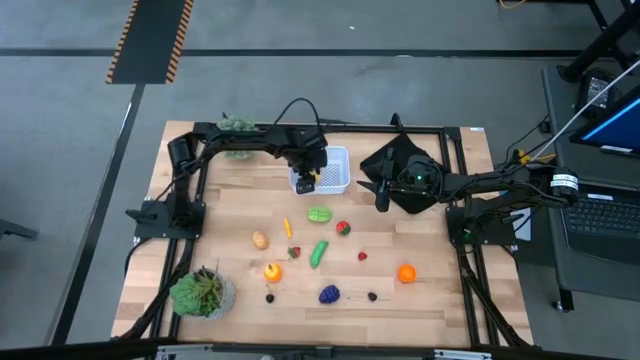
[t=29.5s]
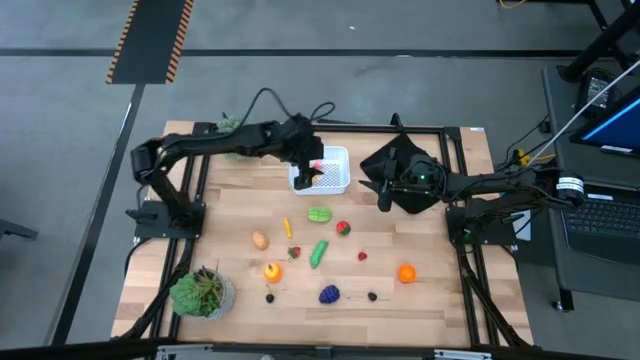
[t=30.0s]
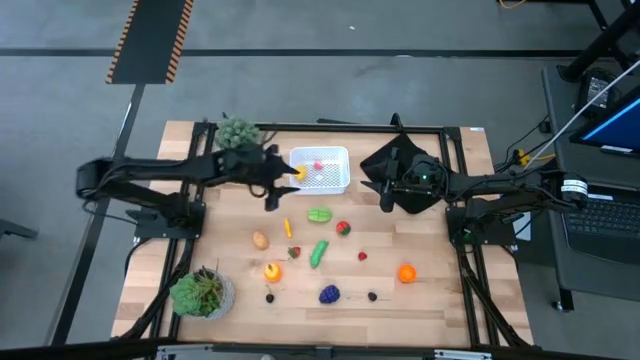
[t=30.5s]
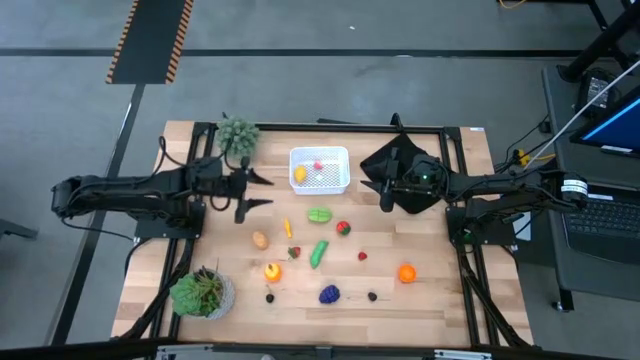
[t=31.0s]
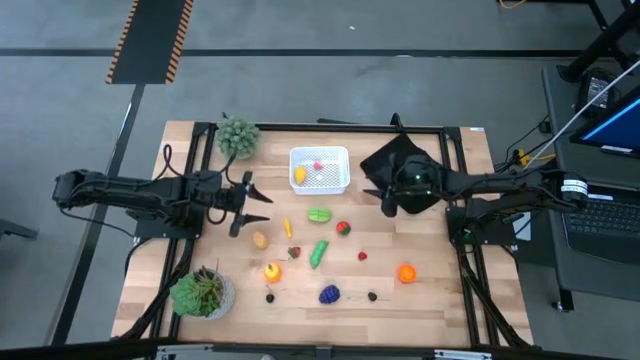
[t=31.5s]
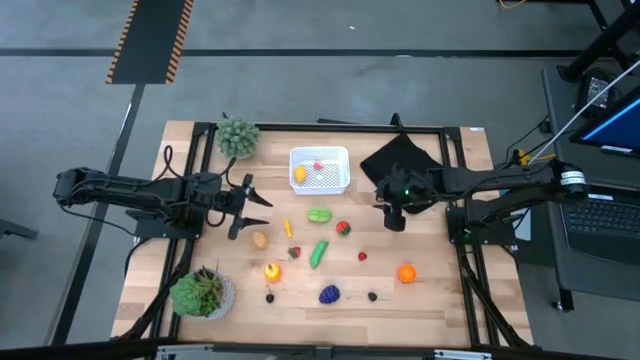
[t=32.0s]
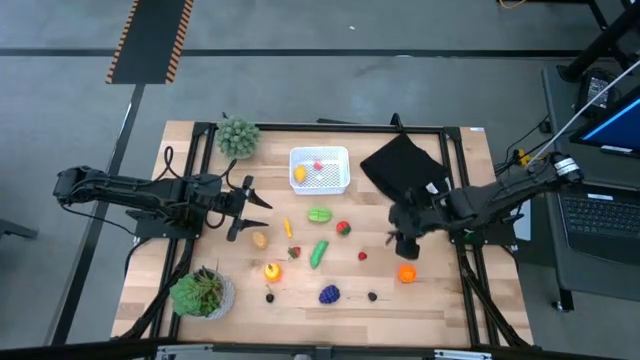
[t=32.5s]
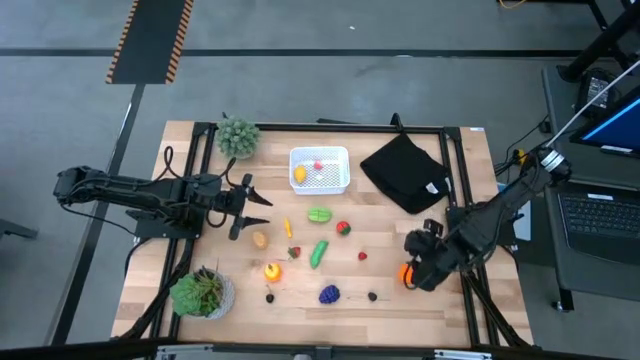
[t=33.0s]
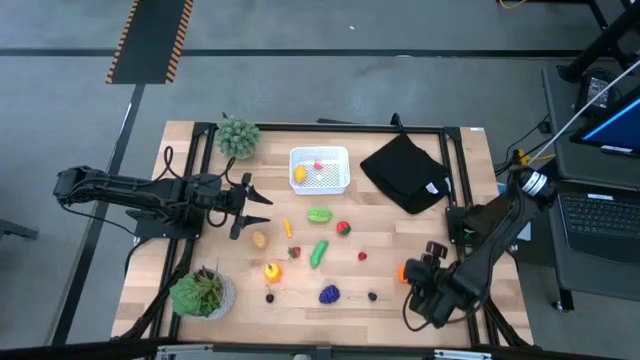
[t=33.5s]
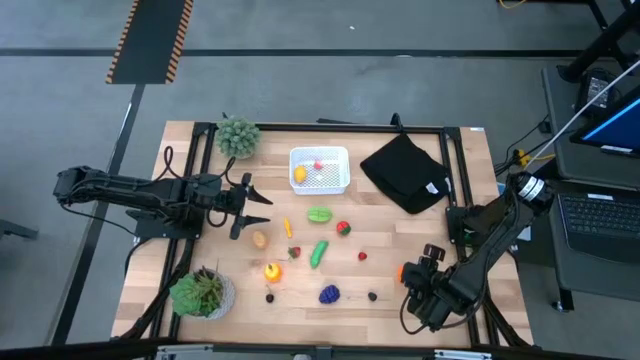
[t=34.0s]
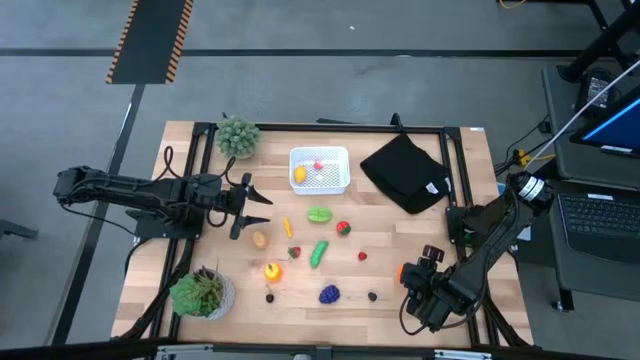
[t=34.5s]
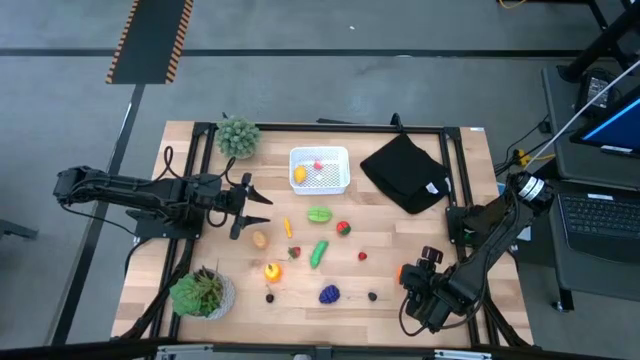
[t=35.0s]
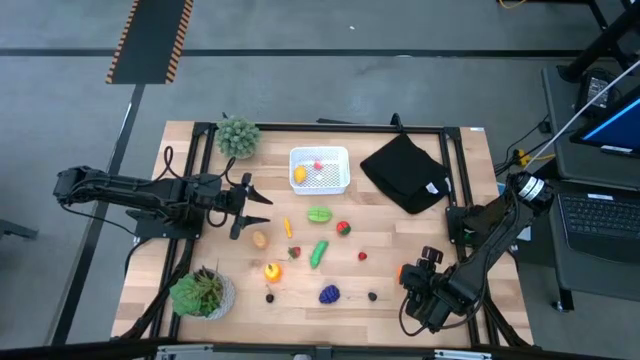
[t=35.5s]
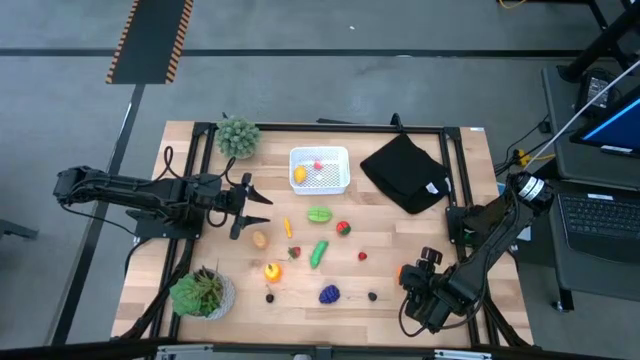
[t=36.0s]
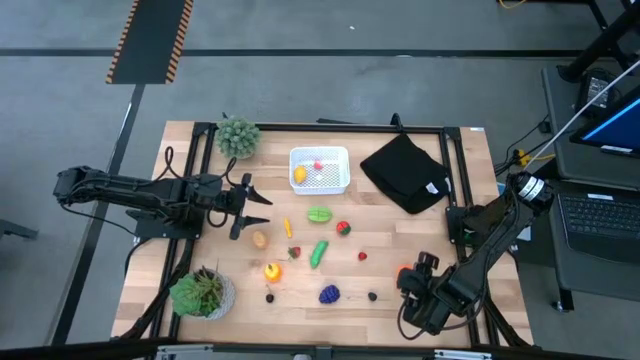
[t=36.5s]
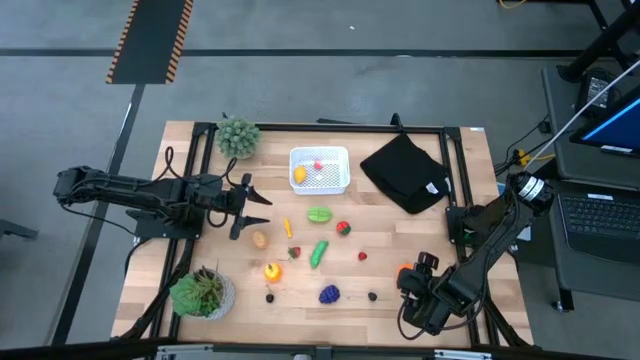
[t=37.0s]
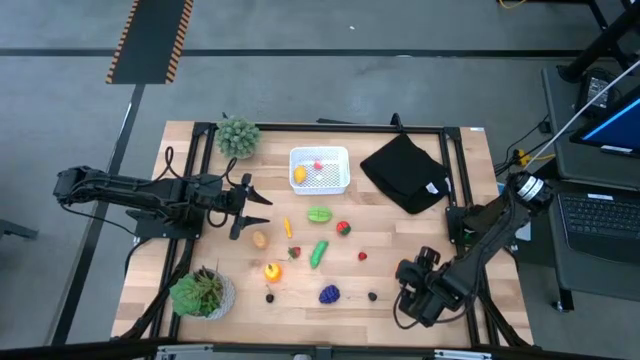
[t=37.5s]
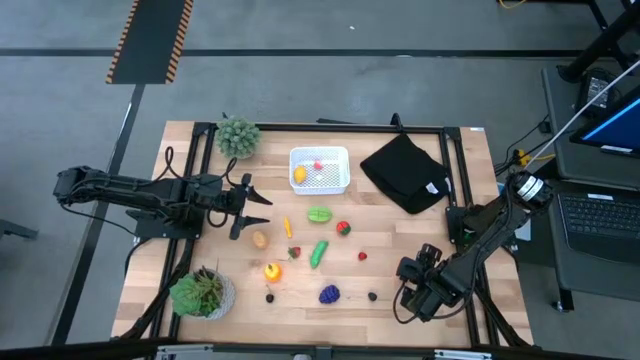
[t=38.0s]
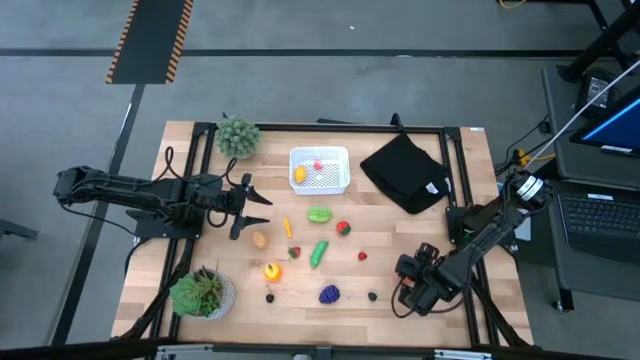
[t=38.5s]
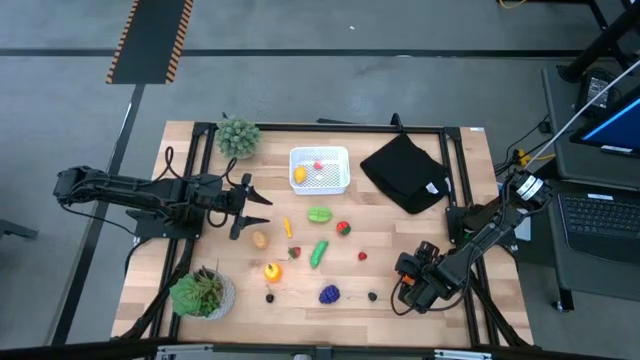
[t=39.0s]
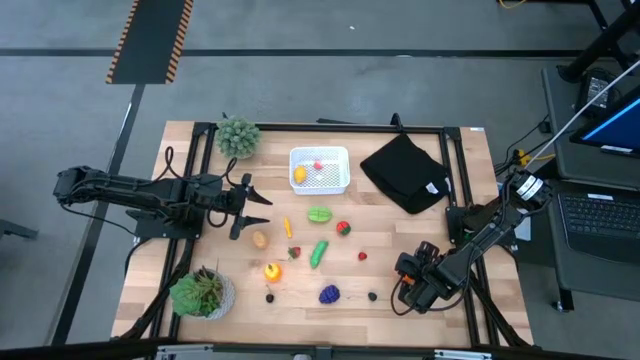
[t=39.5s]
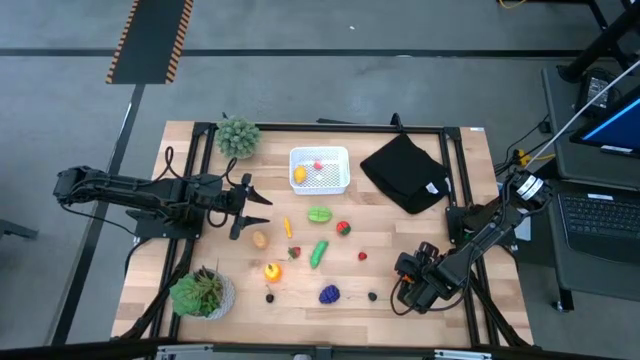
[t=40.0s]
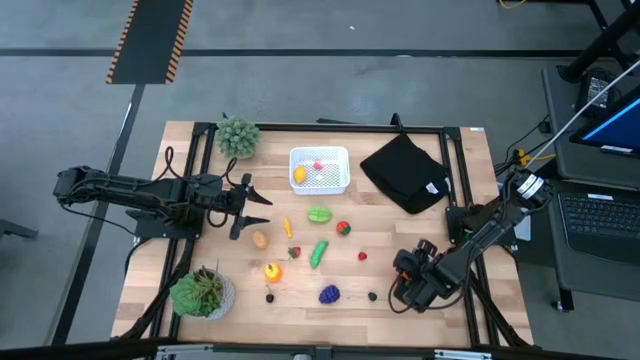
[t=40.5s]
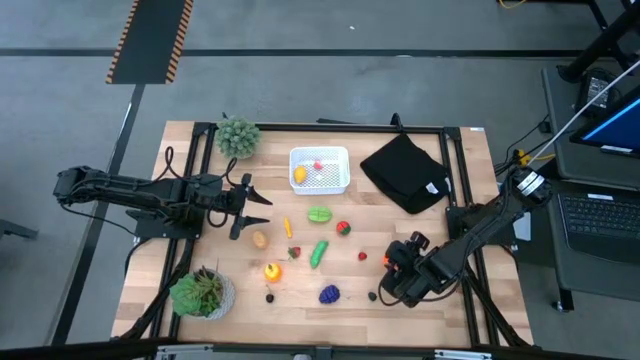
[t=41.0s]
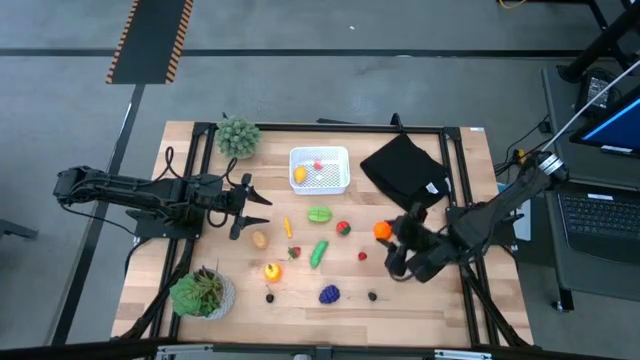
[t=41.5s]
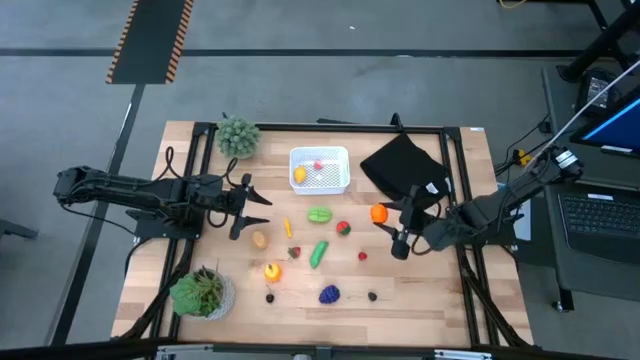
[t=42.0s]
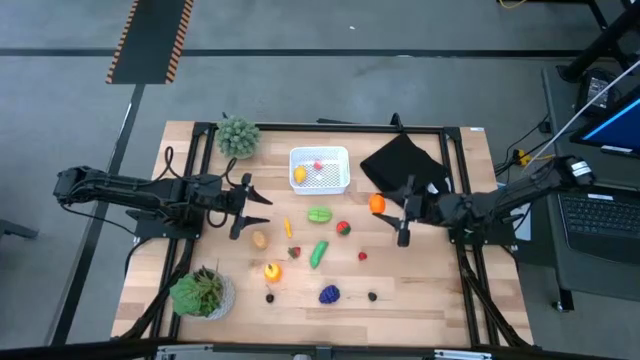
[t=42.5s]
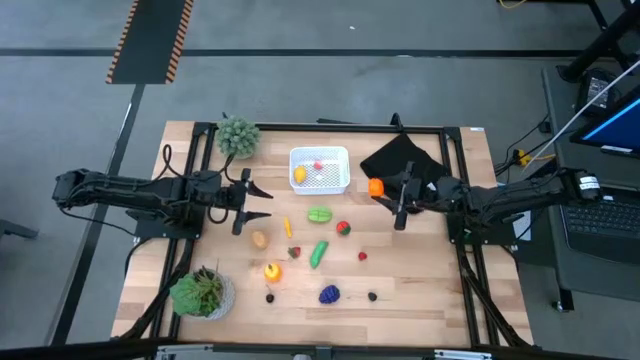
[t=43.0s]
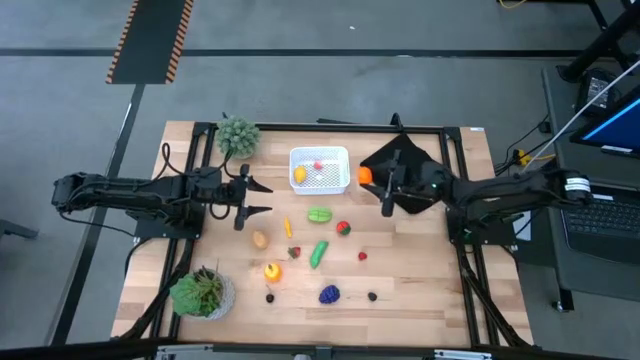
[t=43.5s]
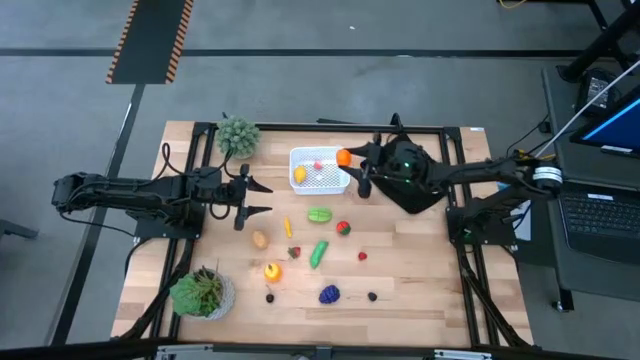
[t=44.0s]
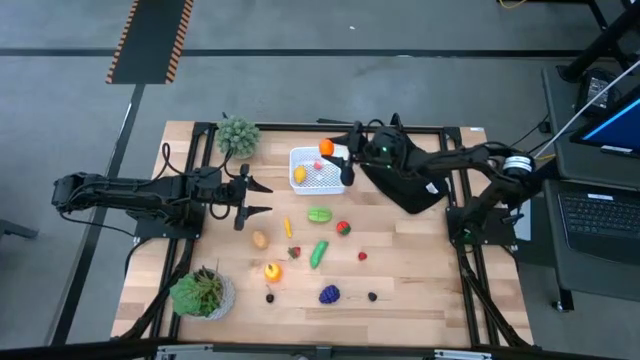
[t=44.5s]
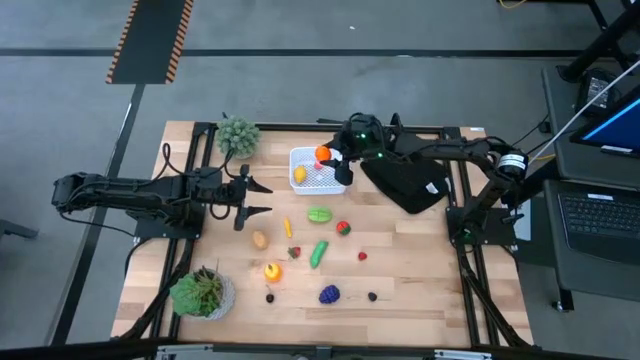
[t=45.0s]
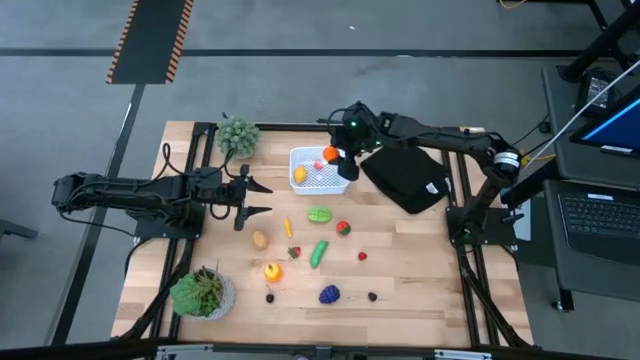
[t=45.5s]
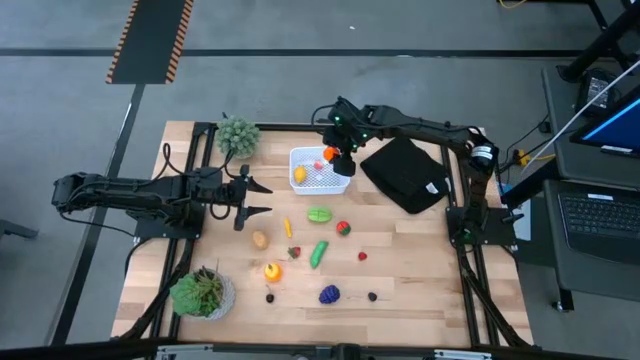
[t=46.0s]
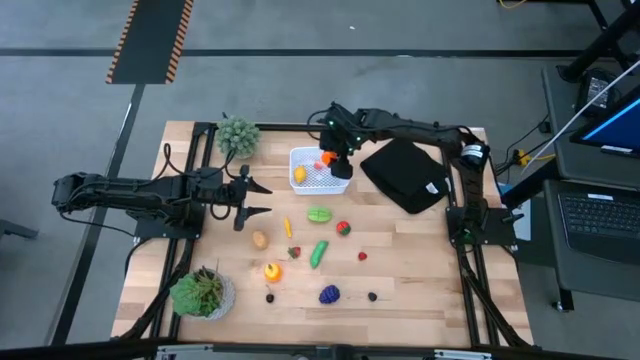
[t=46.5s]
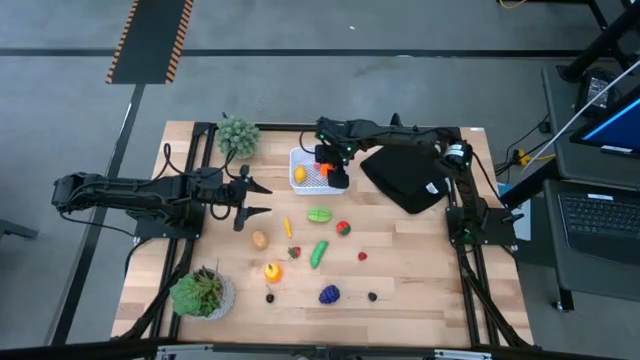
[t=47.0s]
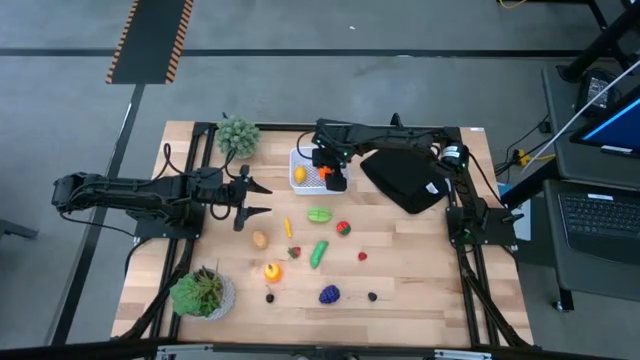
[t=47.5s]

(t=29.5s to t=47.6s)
Task: Pick and placing Produce into tupperware
Put the pumpkin into the white bin

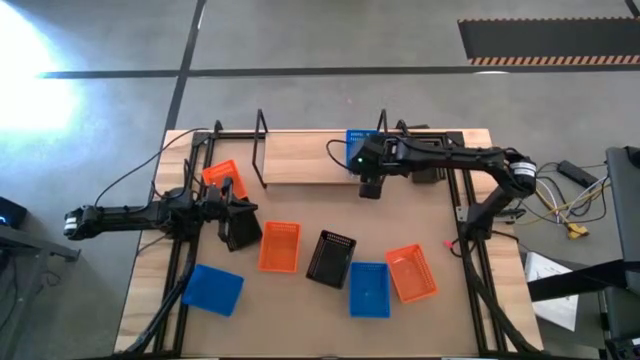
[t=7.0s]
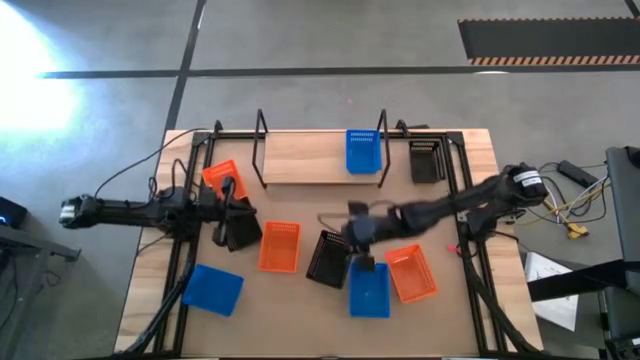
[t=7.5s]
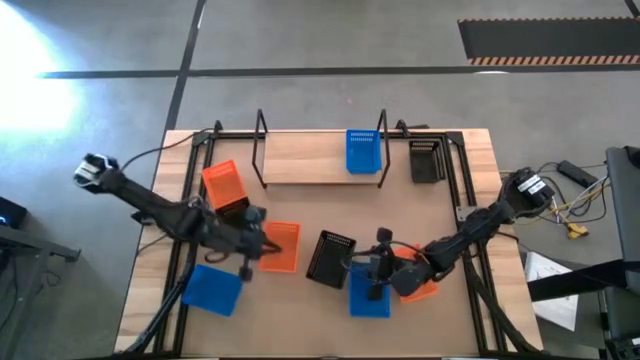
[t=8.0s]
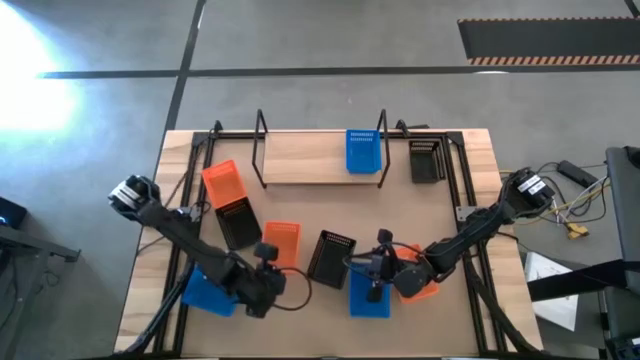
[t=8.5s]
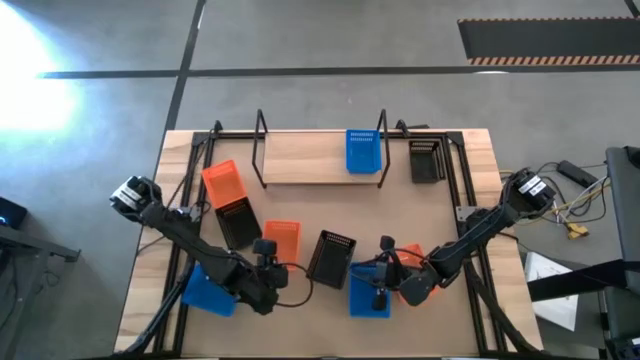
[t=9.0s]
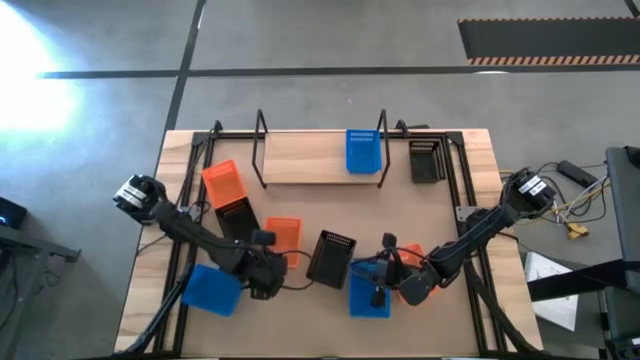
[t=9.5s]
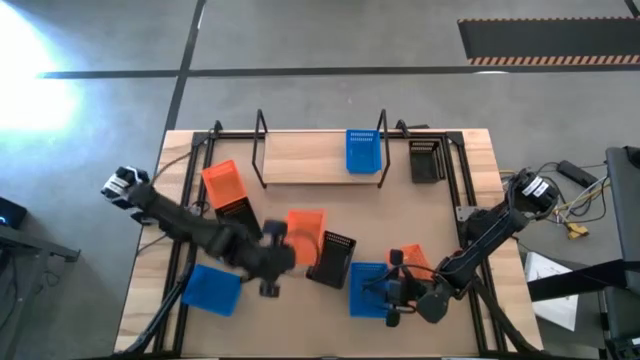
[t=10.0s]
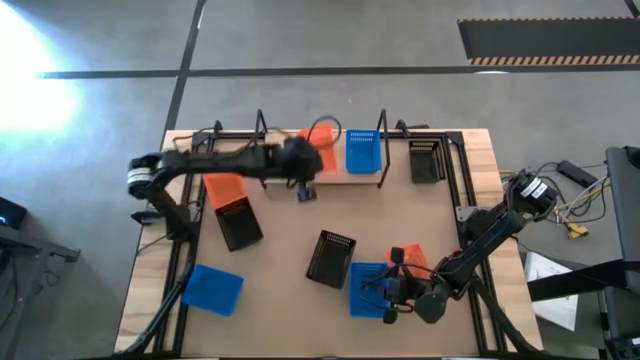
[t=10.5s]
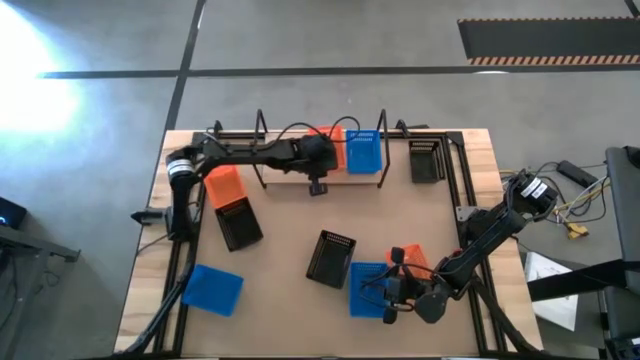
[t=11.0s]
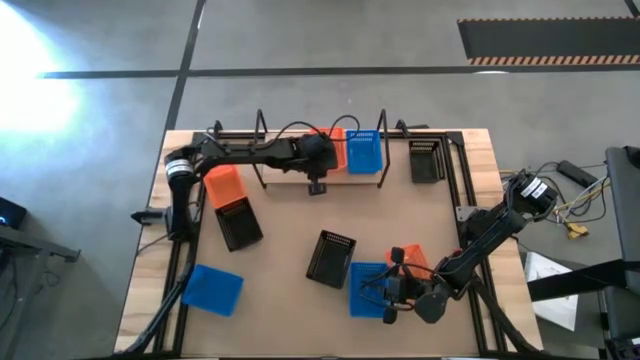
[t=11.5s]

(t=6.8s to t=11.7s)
Task: Stack baskets on shelf by color
Put the middle orange bin on the shelf
